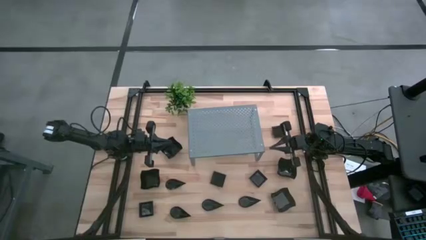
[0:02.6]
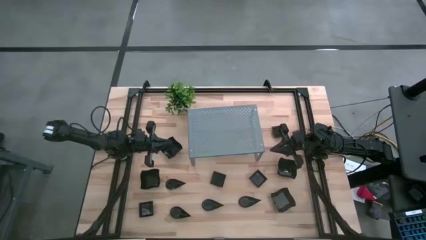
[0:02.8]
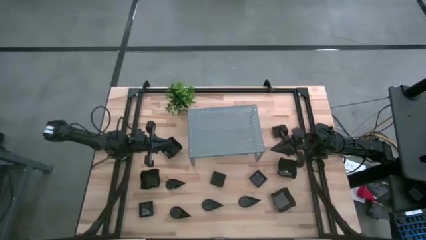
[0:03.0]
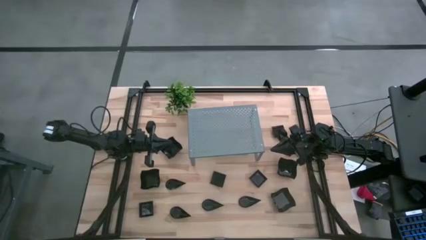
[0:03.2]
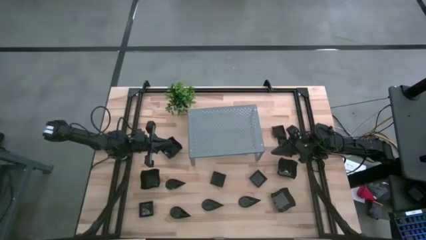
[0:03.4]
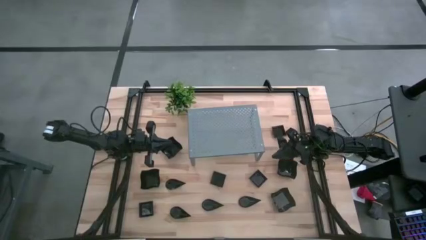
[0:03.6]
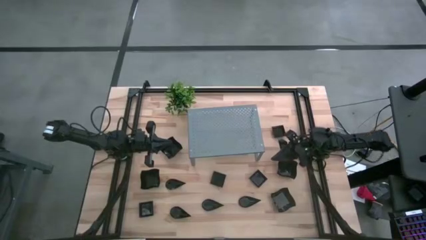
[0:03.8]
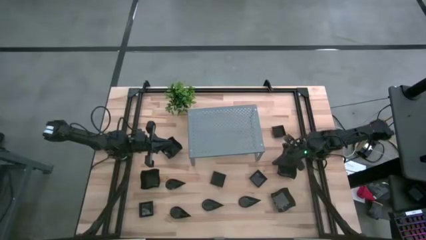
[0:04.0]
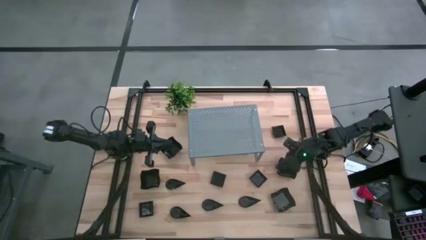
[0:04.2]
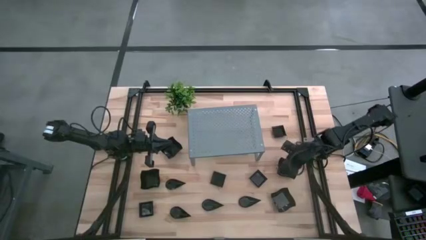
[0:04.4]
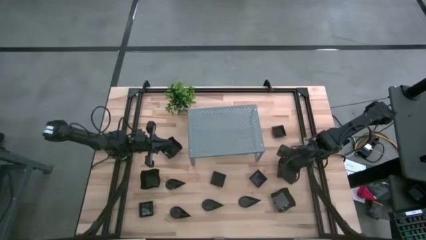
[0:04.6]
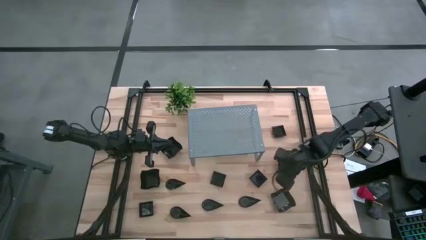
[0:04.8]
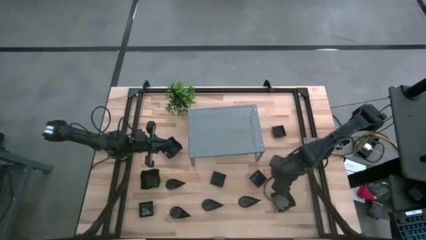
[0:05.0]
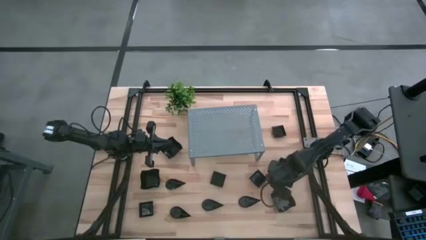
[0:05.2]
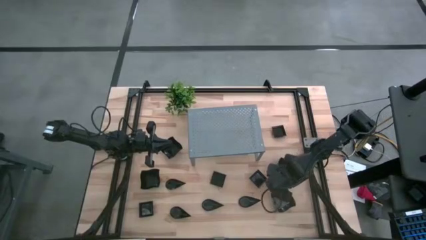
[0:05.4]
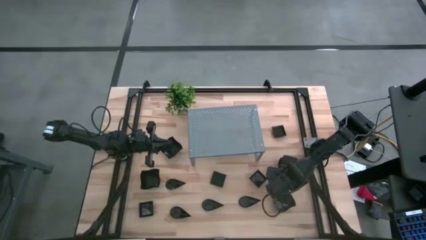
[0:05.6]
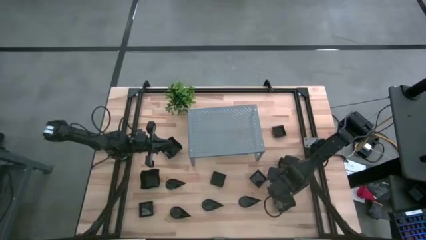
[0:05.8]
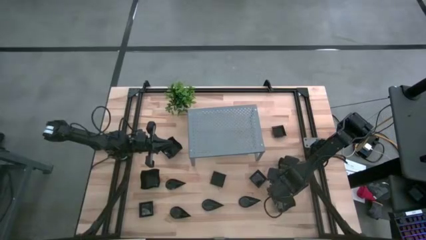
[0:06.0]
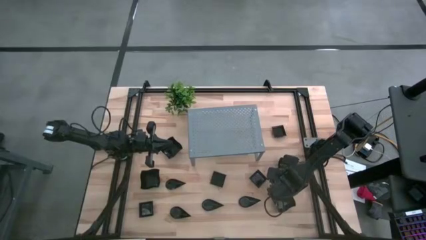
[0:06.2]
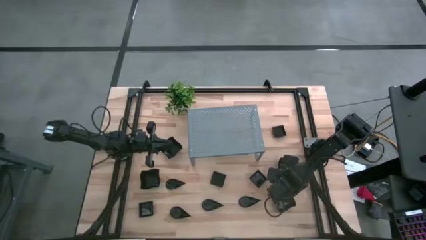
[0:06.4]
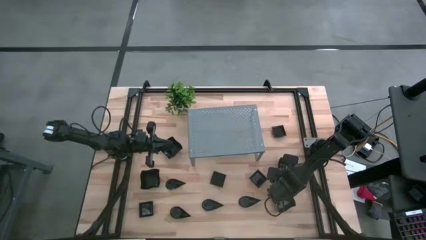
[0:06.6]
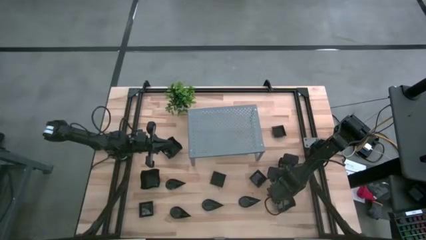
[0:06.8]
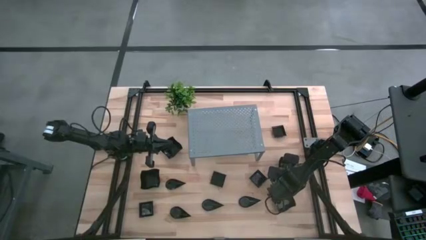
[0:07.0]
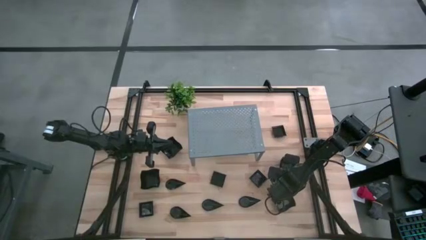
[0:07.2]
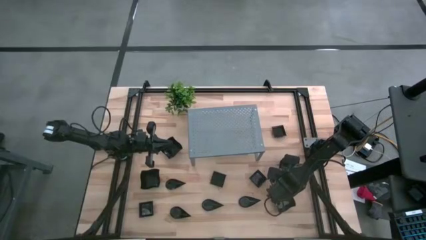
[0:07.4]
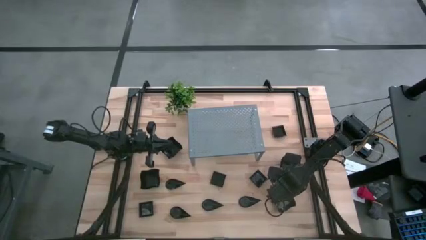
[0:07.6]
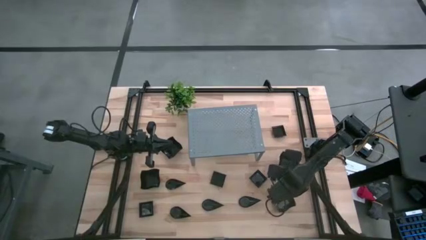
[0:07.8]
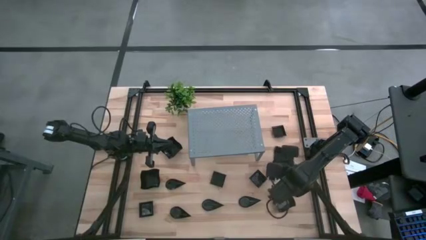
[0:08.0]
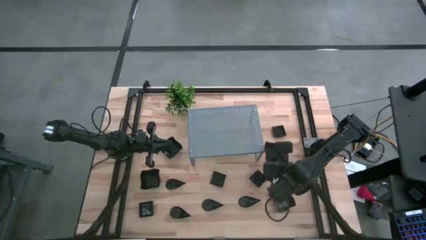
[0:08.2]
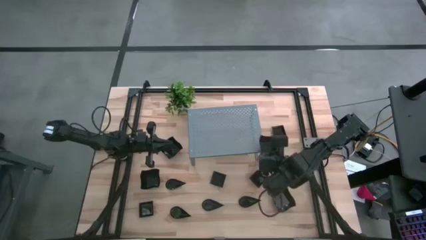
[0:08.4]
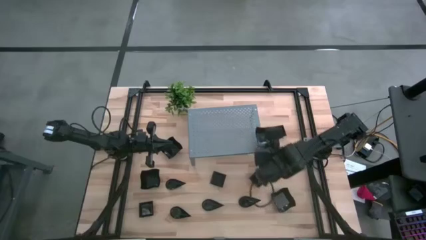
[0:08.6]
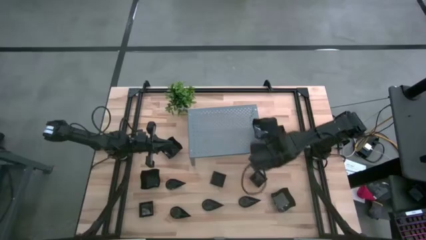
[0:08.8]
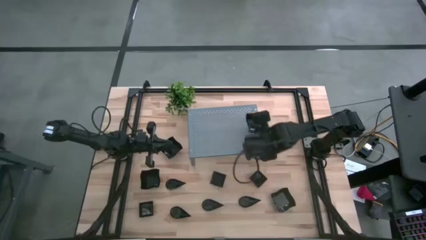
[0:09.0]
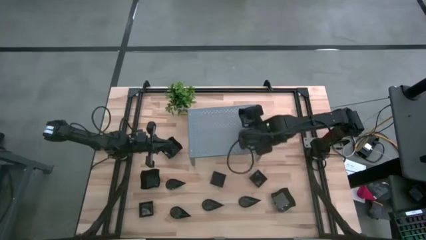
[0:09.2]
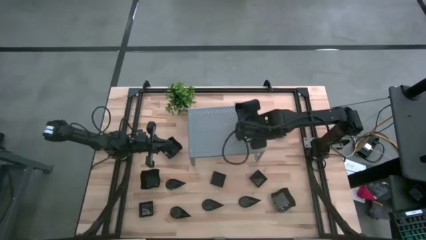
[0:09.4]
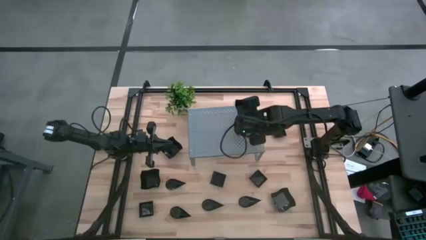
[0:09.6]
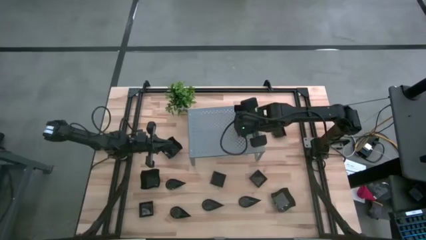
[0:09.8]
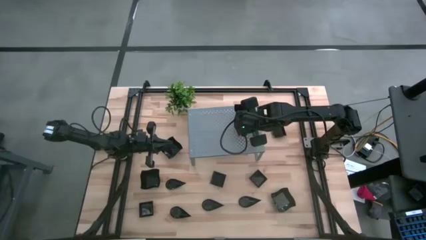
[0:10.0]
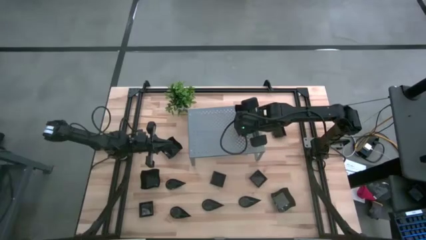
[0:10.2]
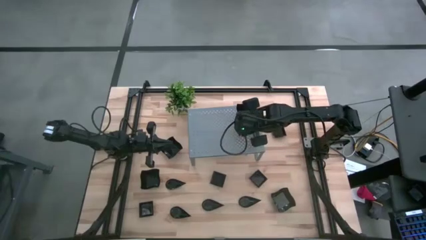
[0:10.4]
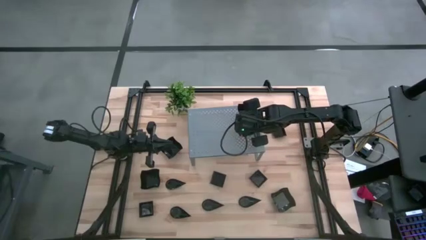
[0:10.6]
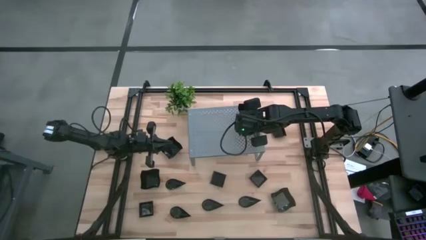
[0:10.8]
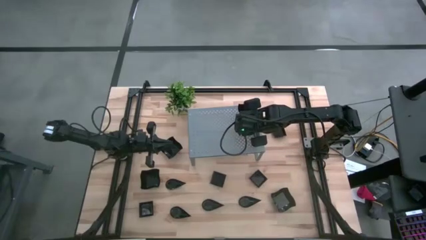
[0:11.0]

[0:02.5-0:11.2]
Task: Pick & Place Mini shaped plates
Put the black distorted square plate on the shelf

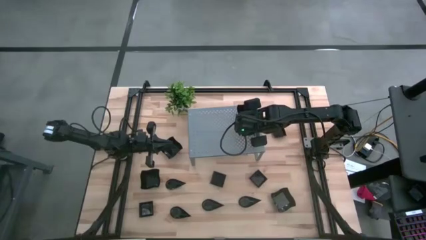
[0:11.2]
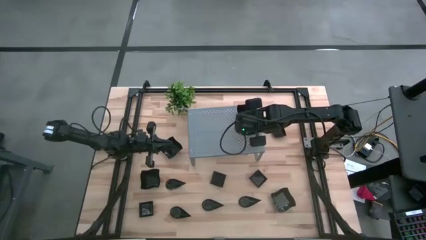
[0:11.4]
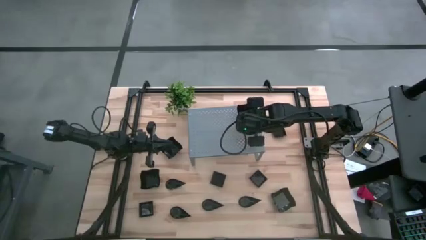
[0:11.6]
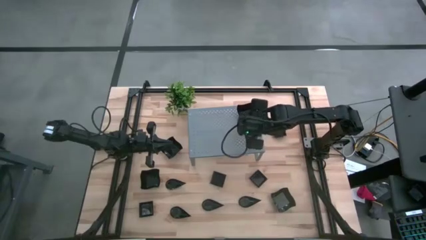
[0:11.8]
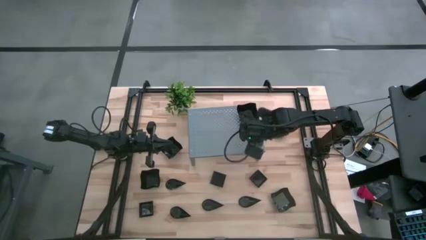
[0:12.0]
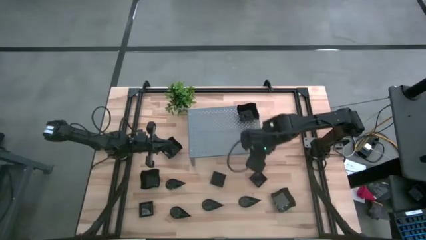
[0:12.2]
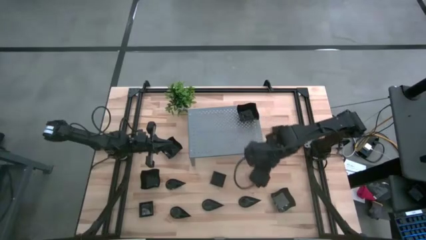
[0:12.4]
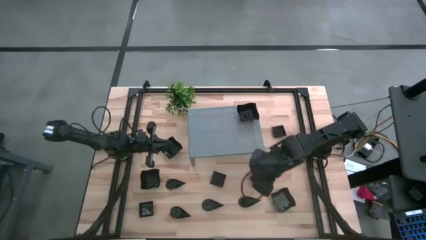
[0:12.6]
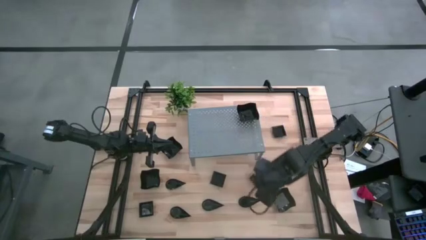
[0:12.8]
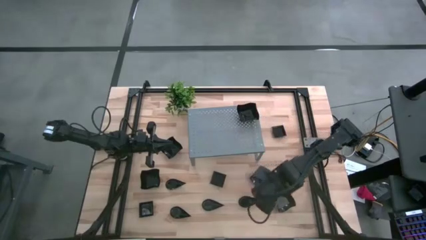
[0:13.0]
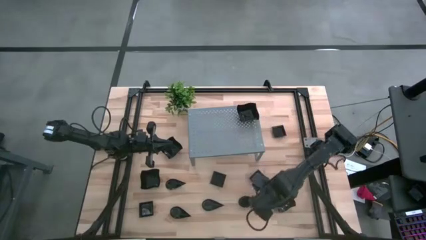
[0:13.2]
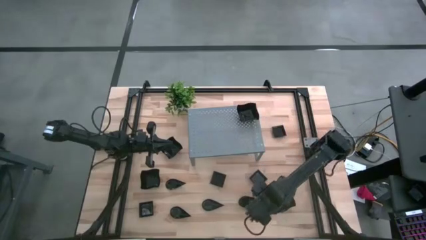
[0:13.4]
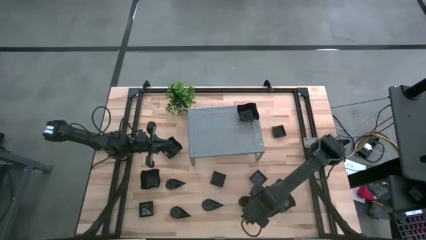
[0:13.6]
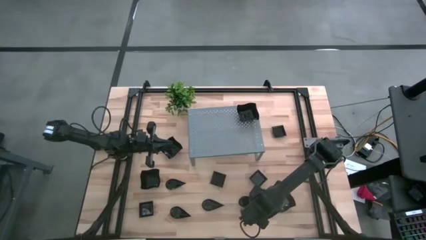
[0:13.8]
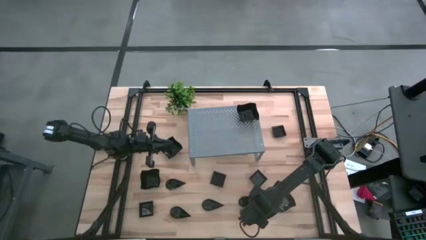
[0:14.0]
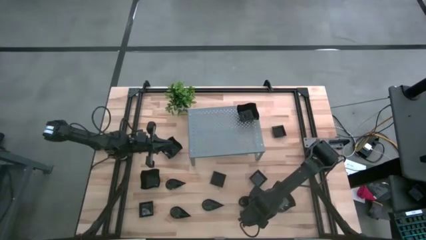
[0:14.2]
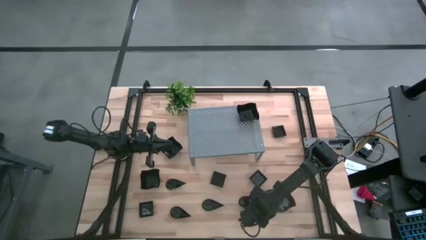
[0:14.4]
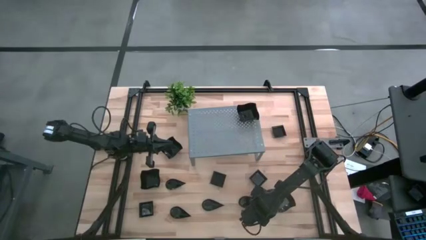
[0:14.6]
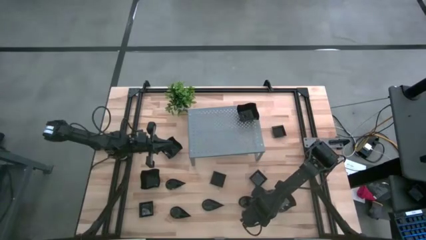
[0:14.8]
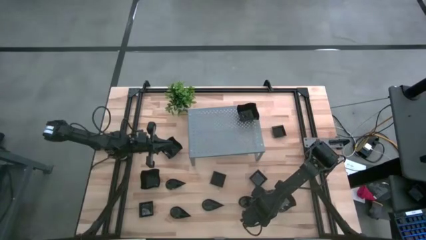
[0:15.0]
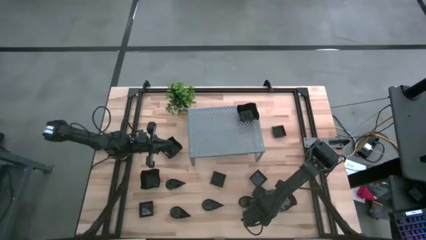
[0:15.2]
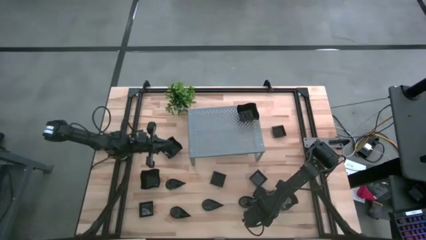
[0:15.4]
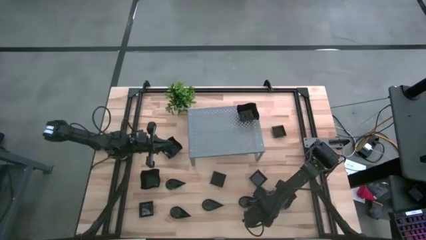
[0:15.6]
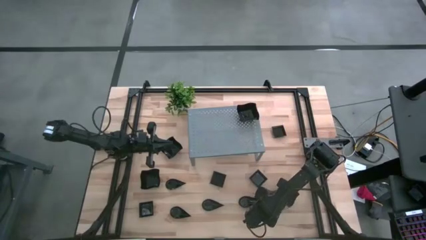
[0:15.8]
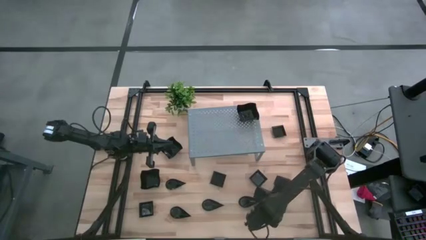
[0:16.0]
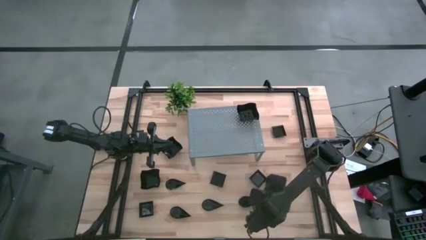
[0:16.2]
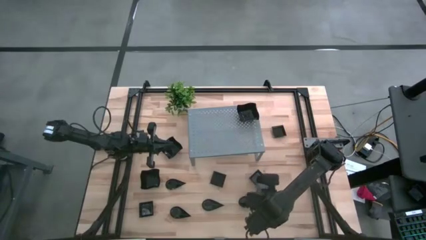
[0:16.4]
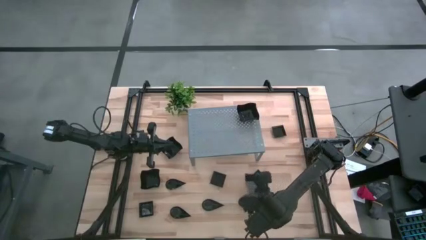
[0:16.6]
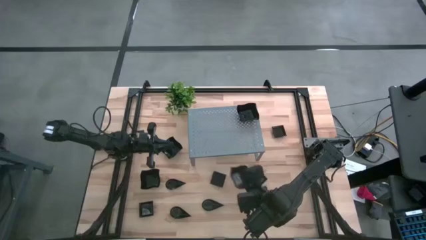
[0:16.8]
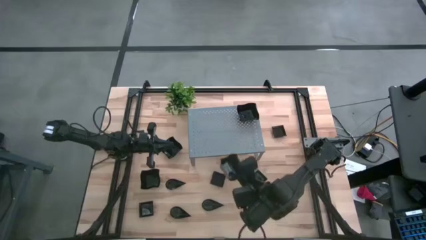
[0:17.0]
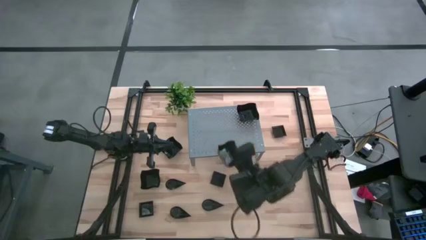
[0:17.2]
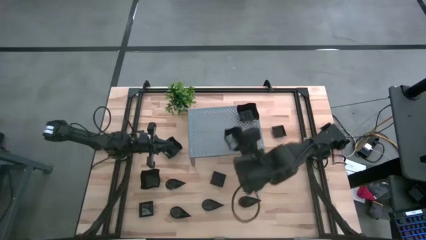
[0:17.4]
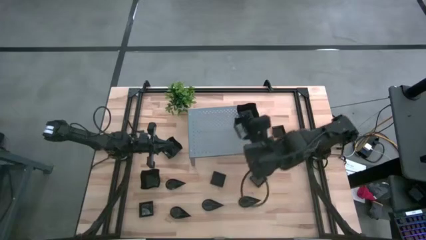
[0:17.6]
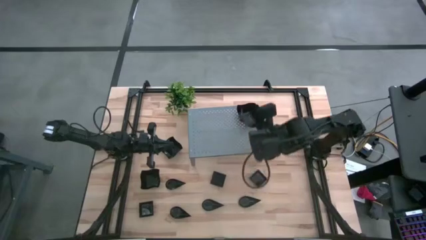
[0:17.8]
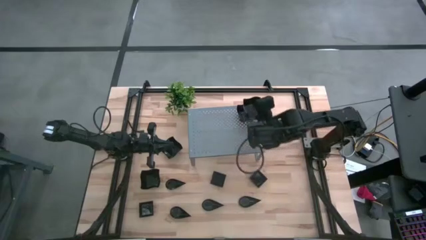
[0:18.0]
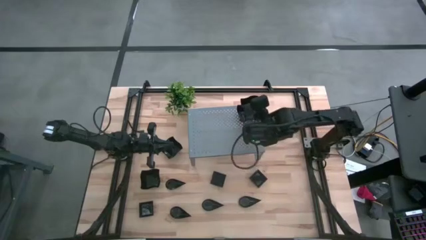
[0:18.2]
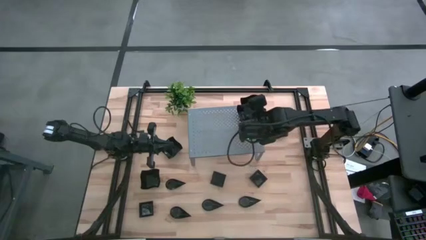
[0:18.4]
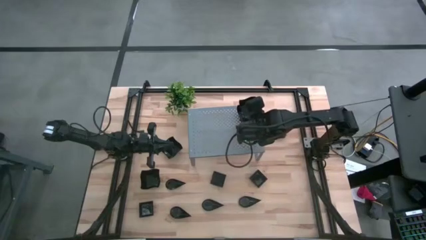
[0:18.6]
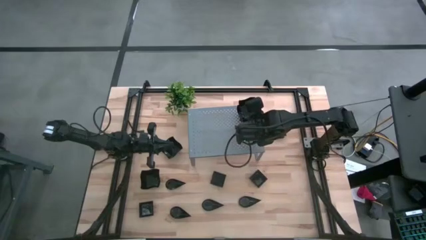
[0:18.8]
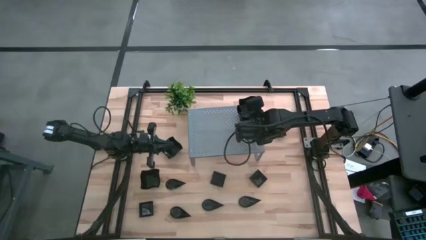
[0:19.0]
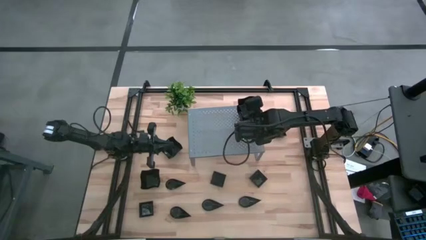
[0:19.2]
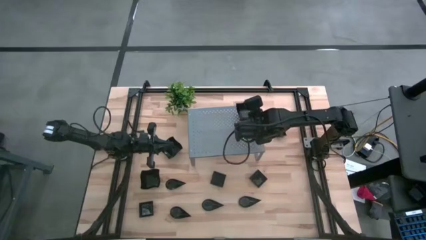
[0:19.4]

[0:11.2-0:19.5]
Stack the black distorted square plate on top of the black distorted square plate on the shelf
